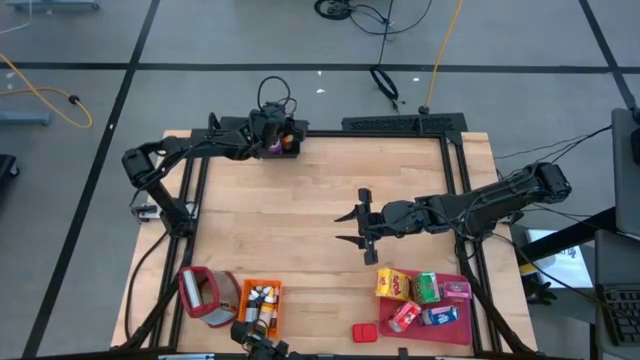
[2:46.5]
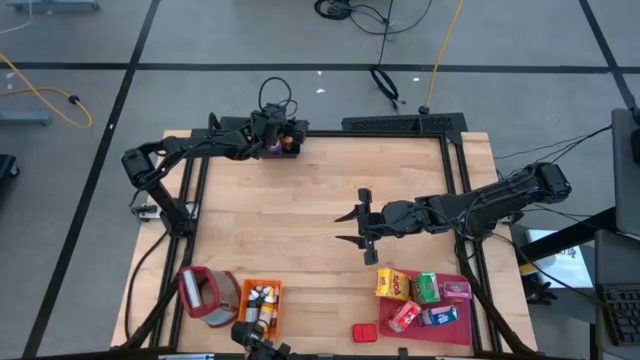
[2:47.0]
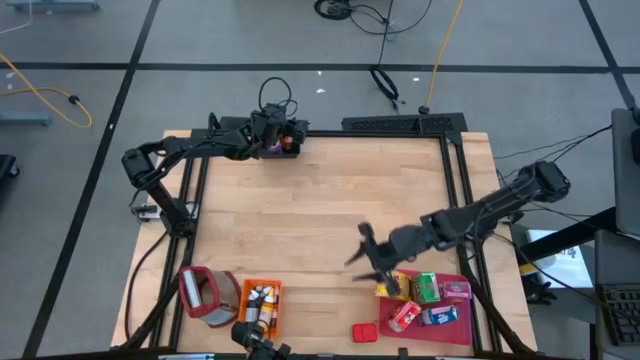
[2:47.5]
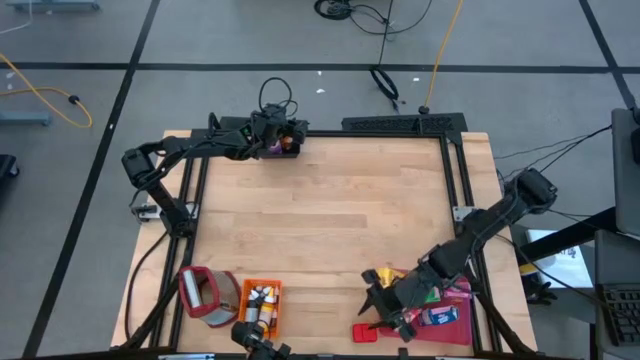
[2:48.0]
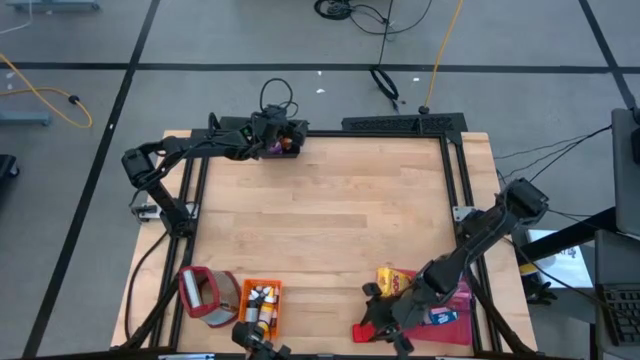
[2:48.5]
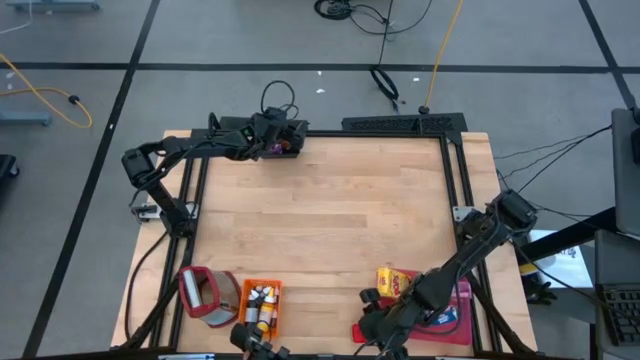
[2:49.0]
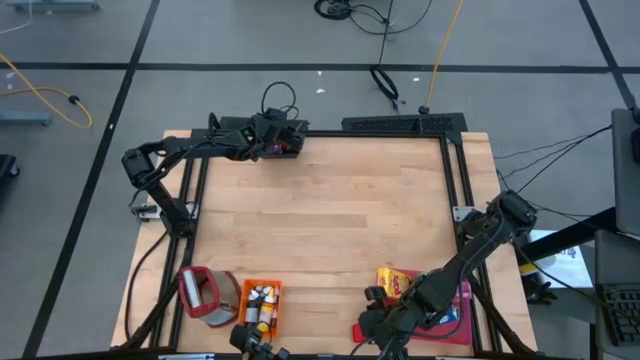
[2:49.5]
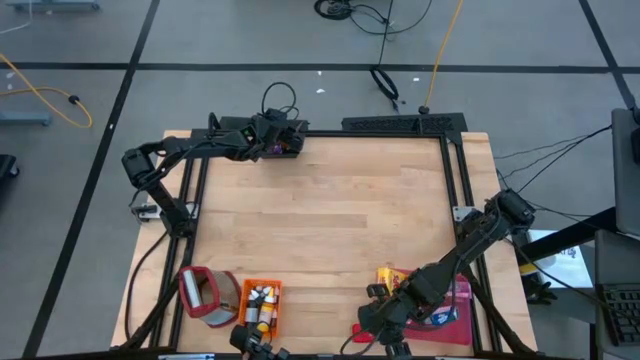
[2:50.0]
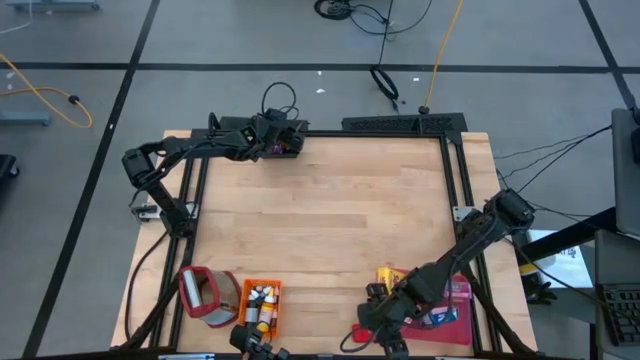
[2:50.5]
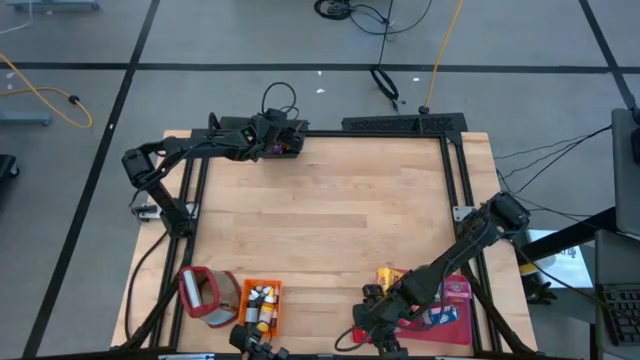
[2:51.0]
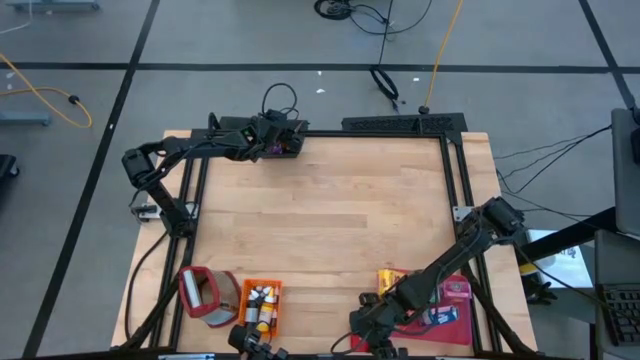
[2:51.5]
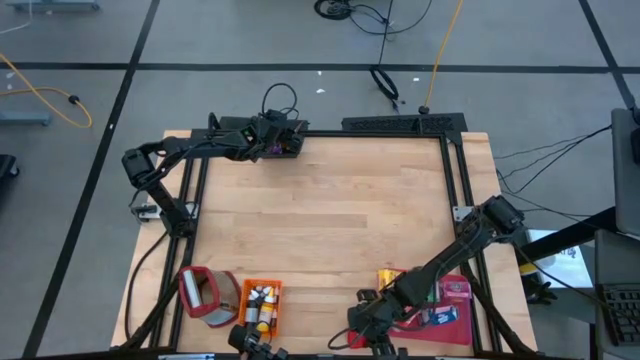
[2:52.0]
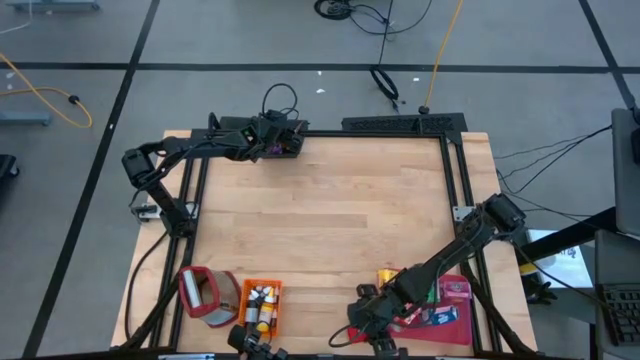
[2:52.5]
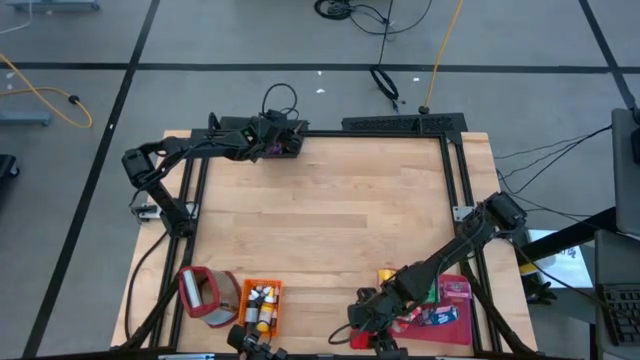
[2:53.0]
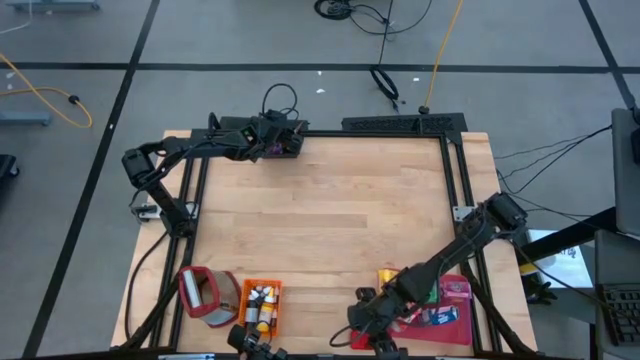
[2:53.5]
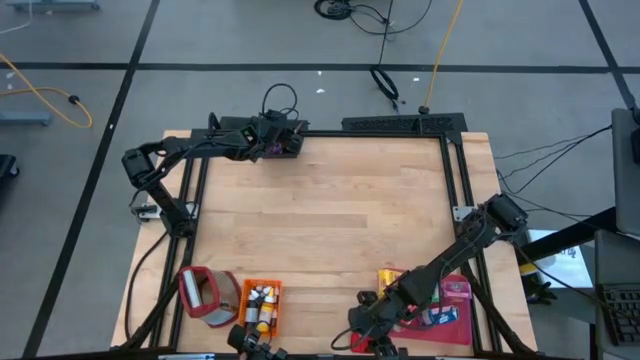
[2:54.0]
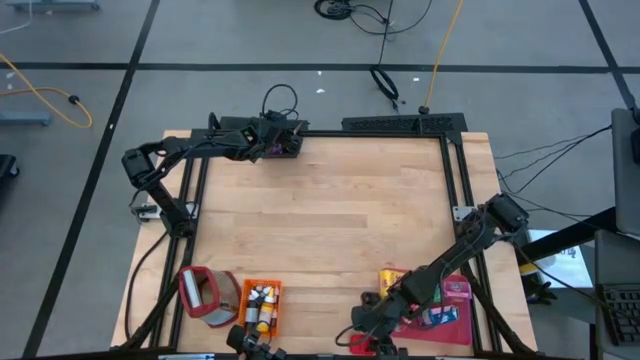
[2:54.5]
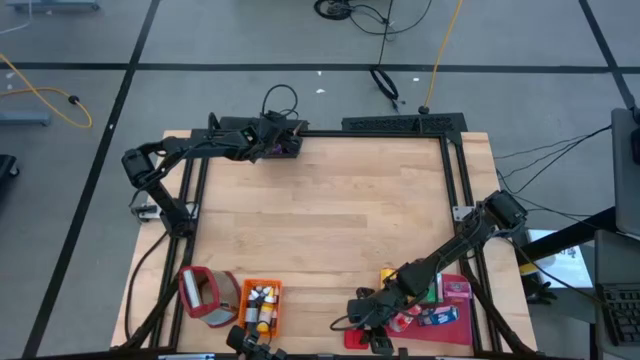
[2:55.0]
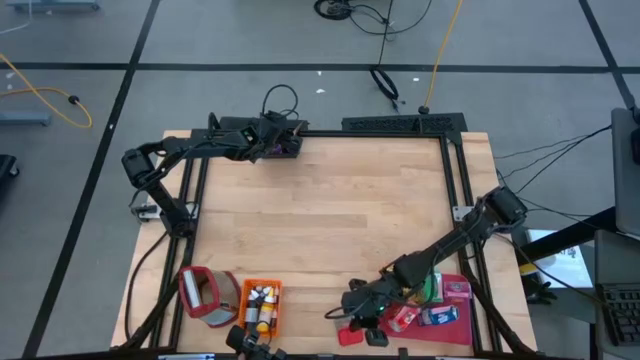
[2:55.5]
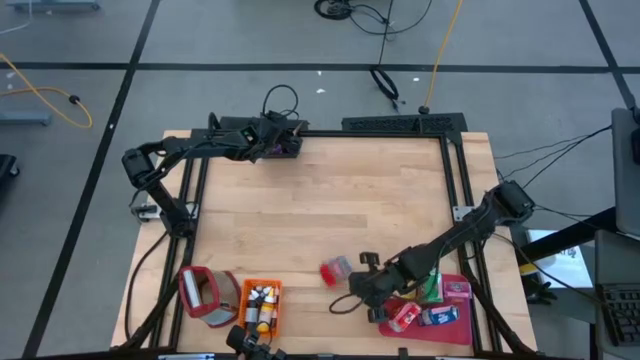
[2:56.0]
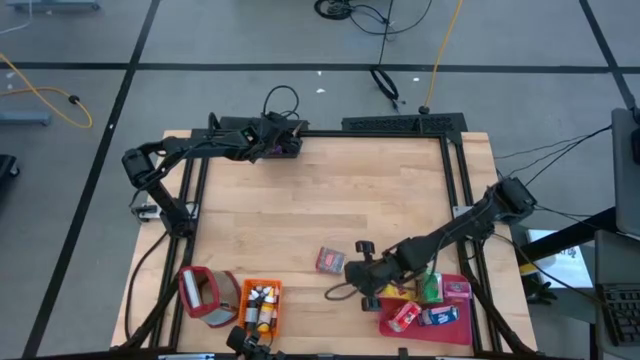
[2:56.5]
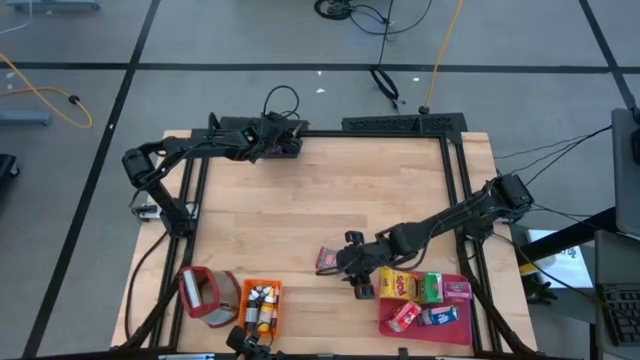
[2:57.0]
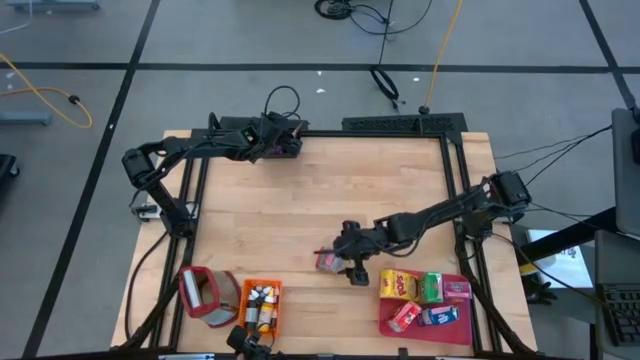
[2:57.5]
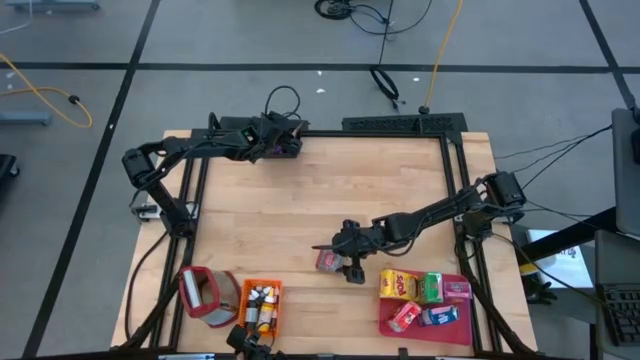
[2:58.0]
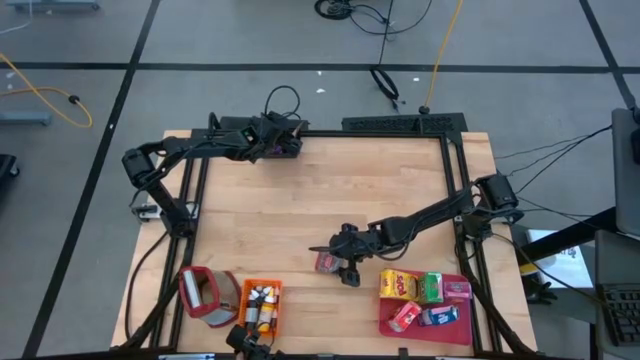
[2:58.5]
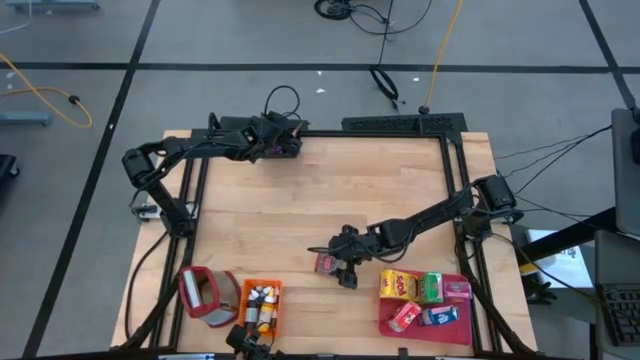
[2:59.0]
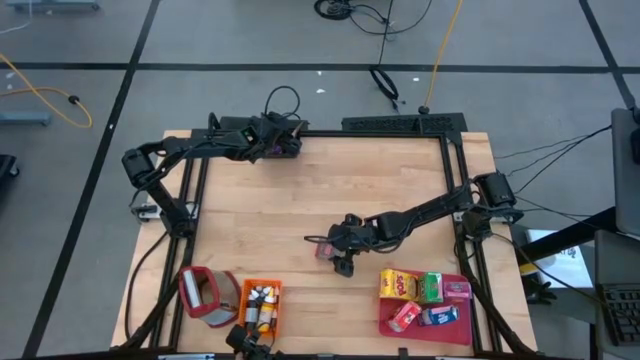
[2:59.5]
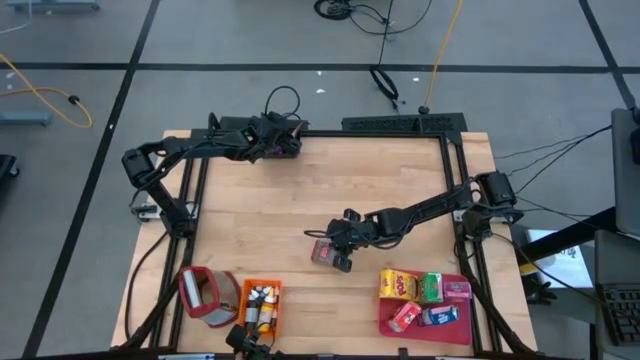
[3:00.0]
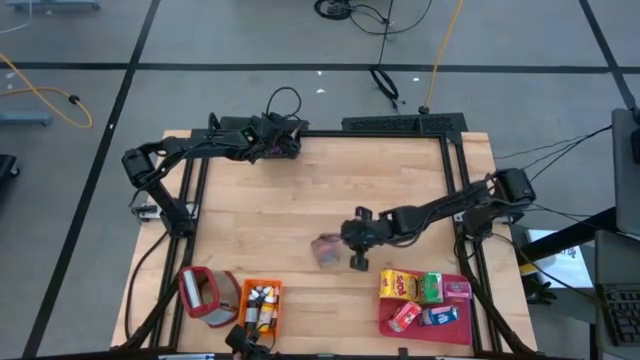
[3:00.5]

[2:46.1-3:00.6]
Task: Pick & Place Kitchen Items
Put the red seasoning can into the black bin

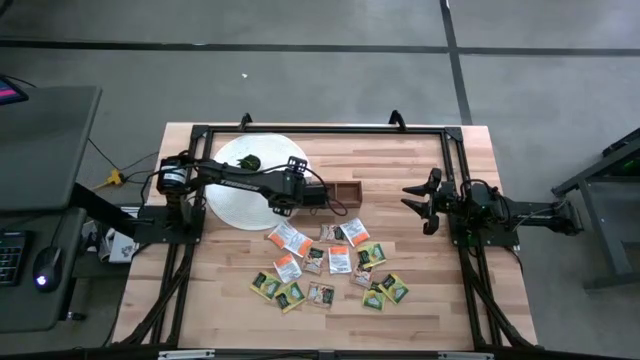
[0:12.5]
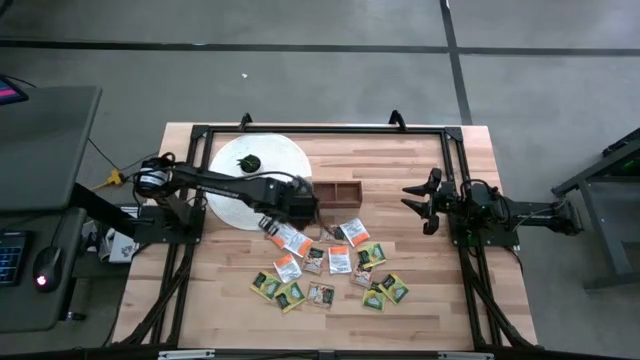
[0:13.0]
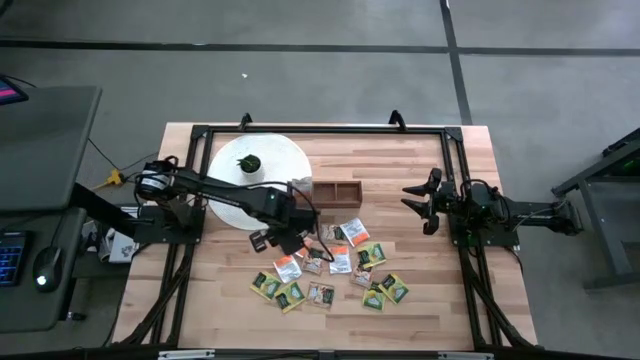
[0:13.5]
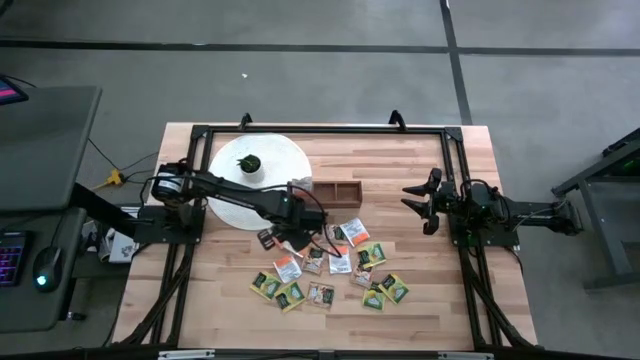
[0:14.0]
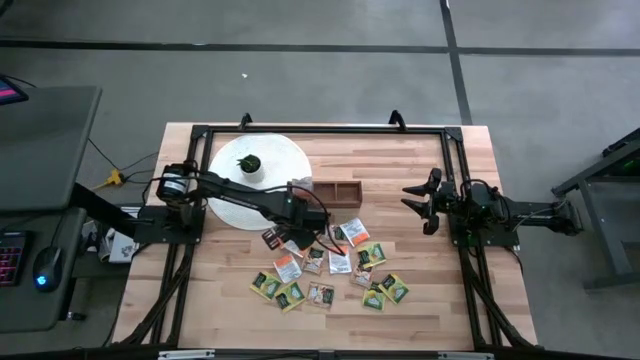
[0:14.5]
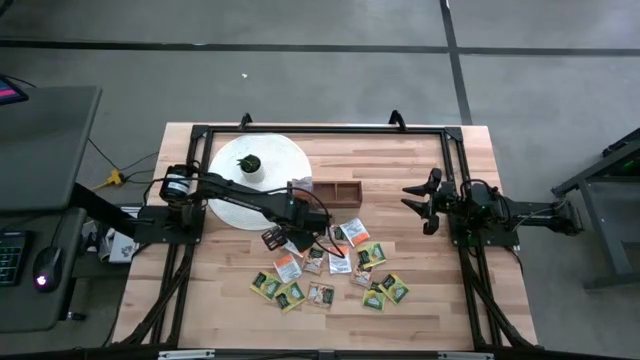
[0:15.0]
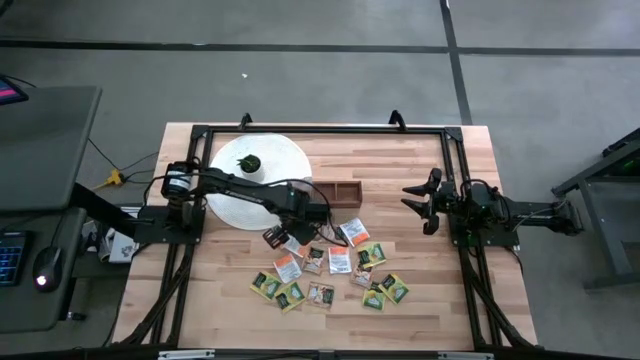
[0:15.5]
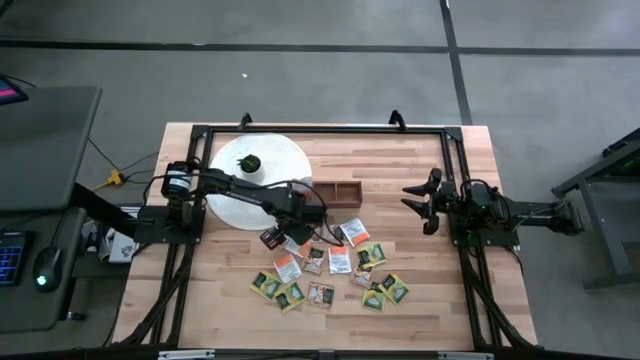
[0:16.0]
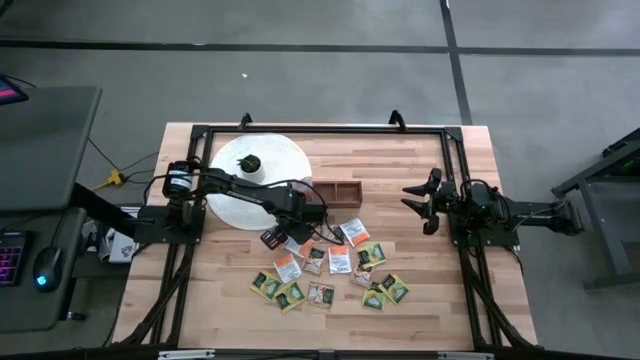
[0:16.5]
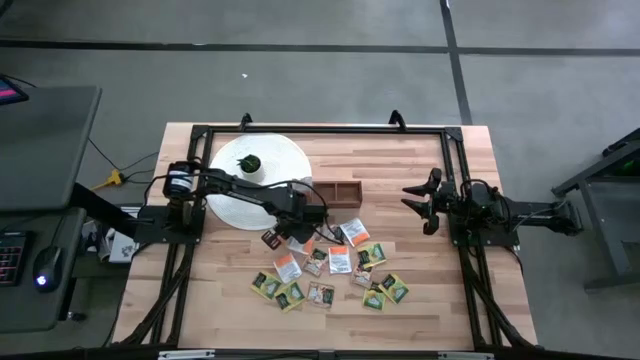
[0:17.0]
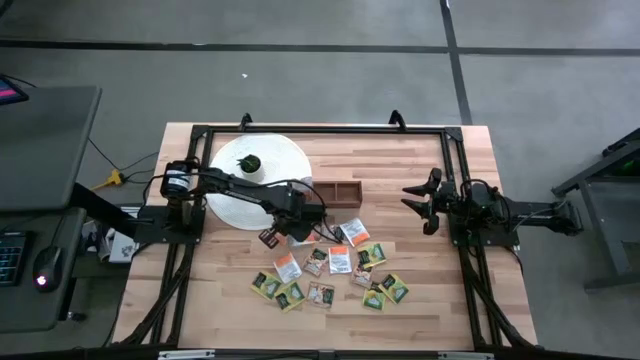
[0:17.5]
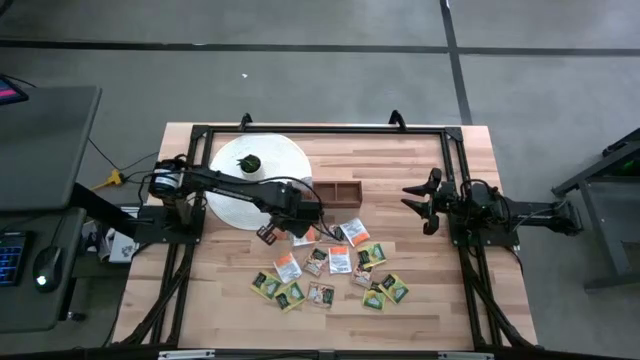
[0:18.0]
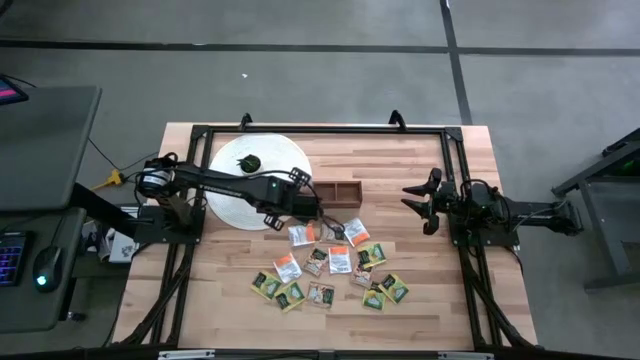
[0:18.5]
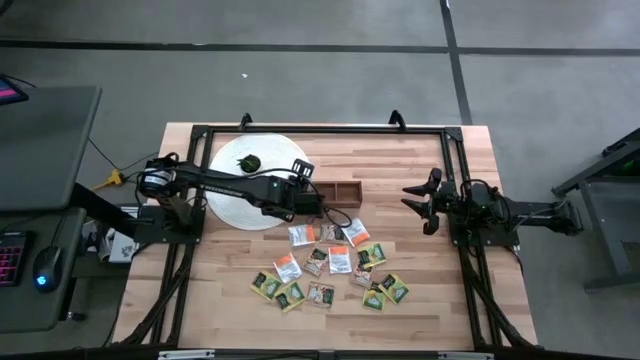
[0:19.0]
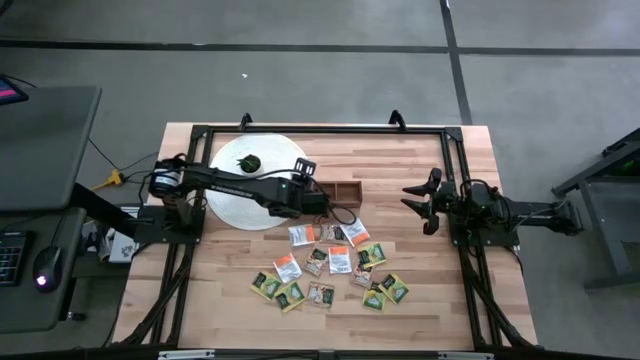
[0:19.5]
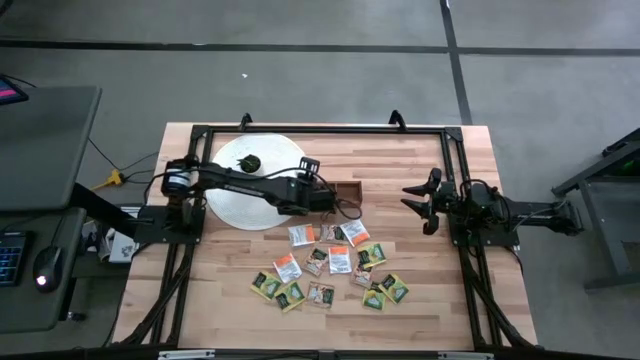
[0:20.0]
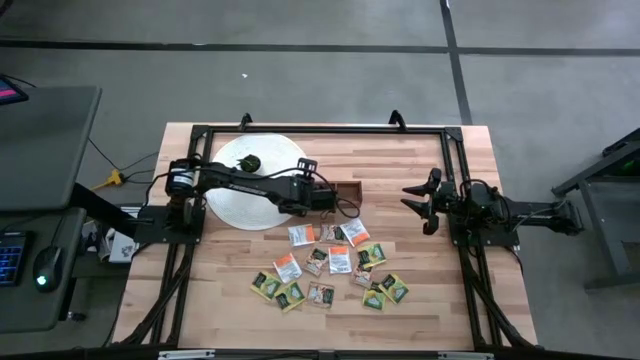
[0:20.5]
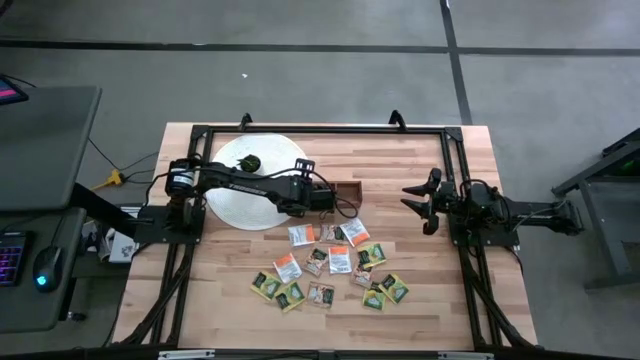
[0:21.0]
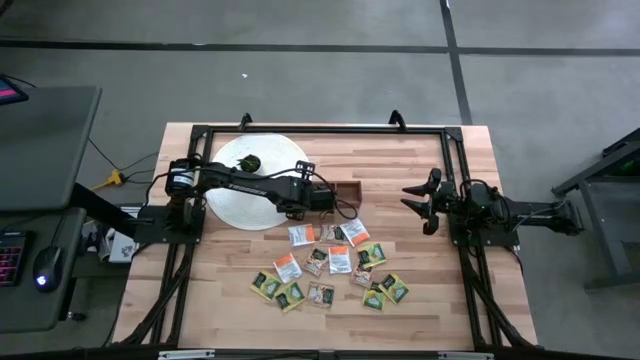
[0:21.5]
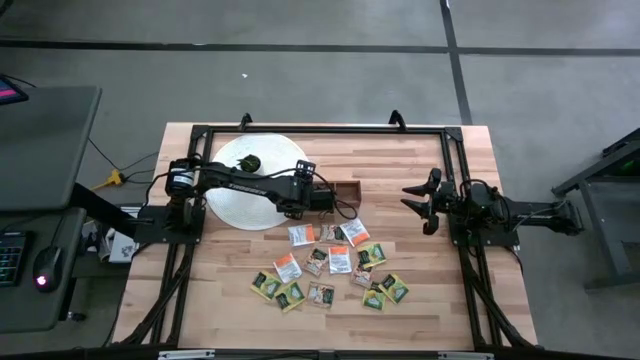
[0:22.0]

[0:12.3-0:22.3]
Task: Pick & Place Tea
Put the white tea bag into the left section of the wooden organizer
